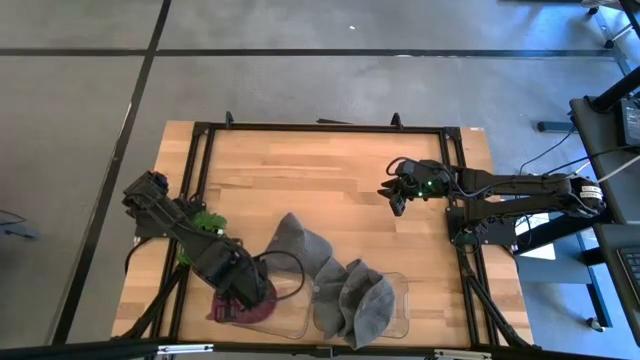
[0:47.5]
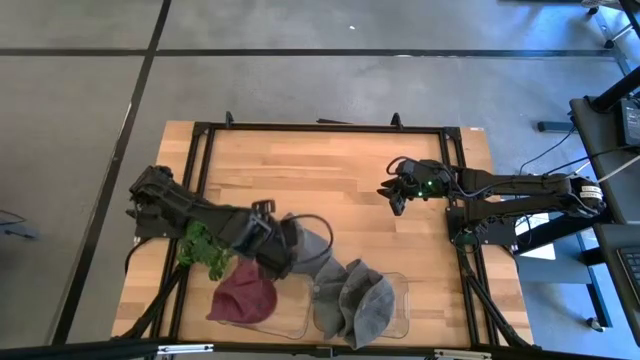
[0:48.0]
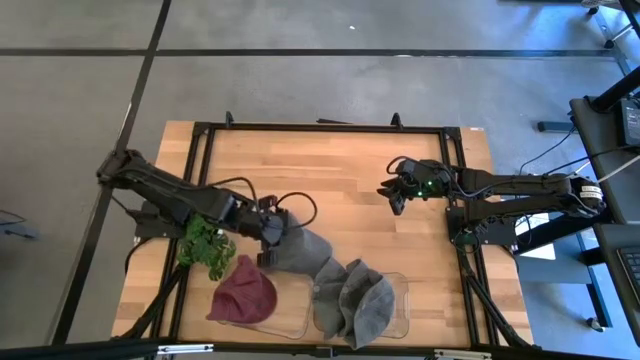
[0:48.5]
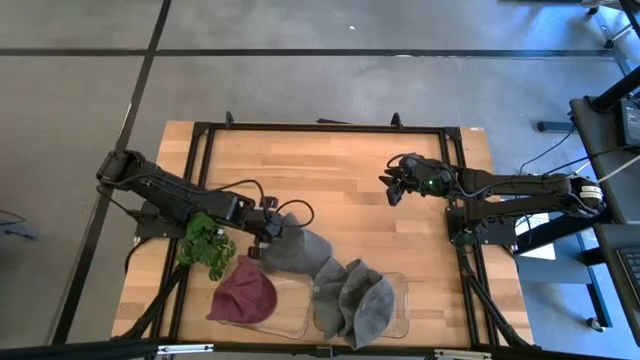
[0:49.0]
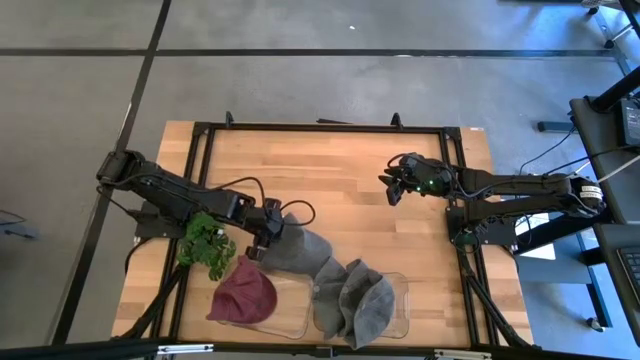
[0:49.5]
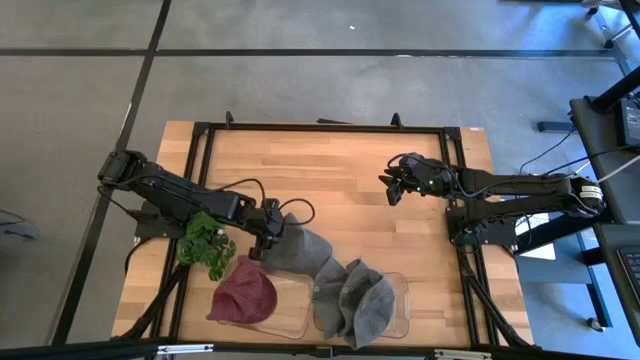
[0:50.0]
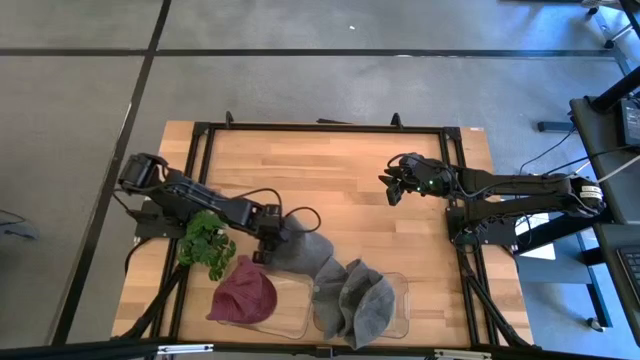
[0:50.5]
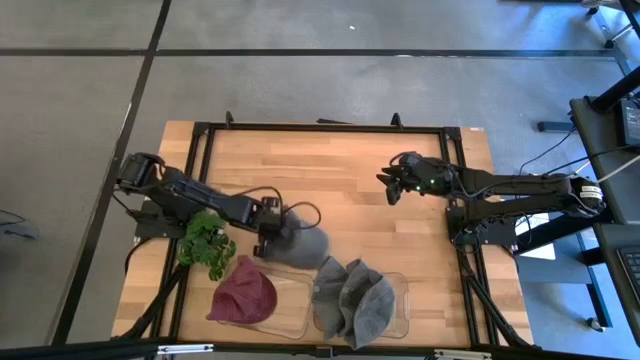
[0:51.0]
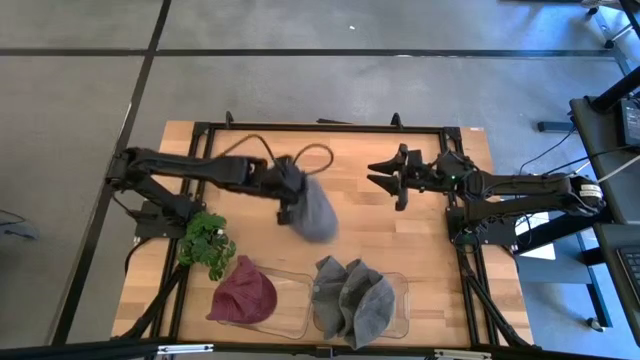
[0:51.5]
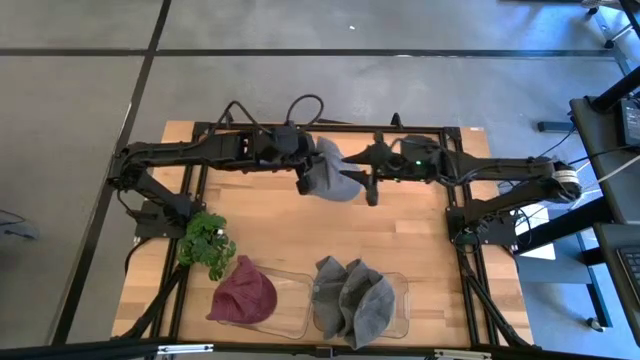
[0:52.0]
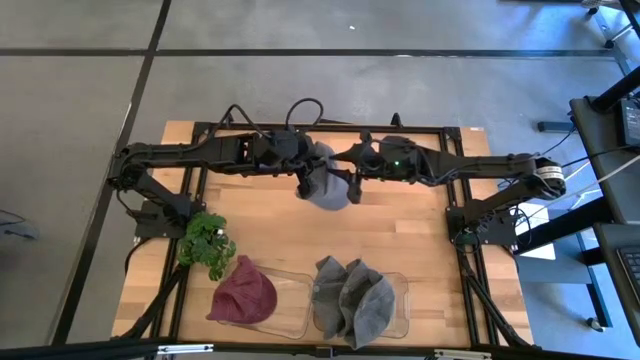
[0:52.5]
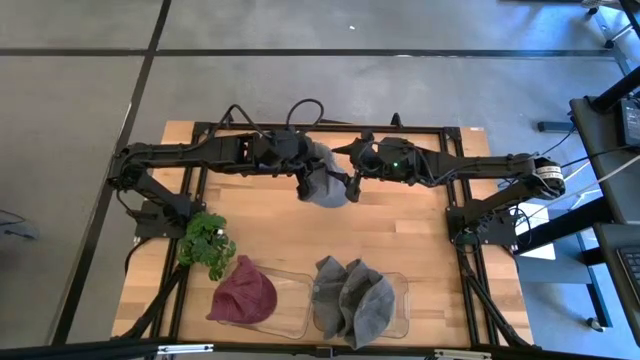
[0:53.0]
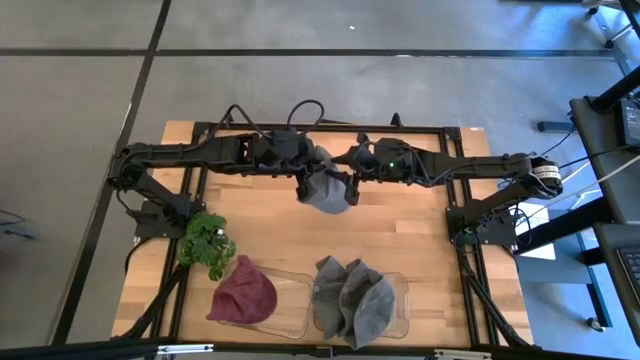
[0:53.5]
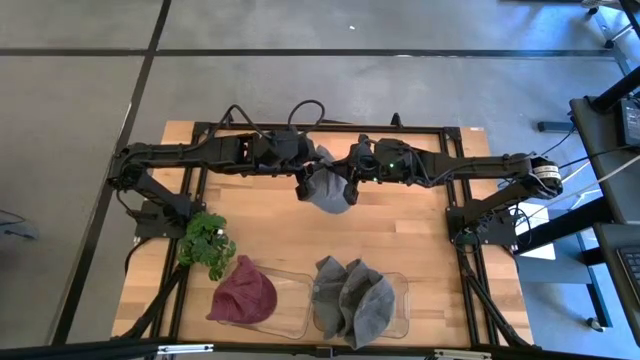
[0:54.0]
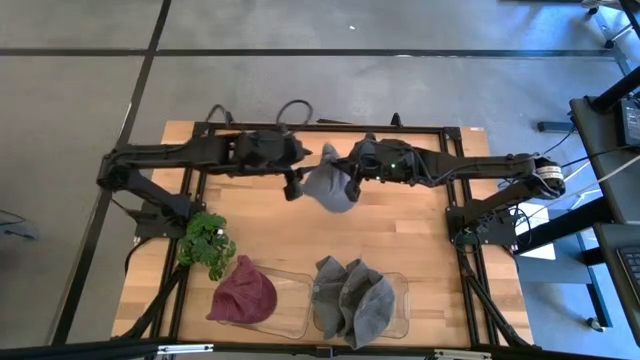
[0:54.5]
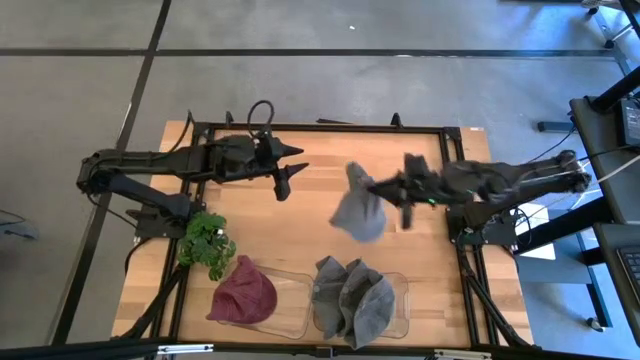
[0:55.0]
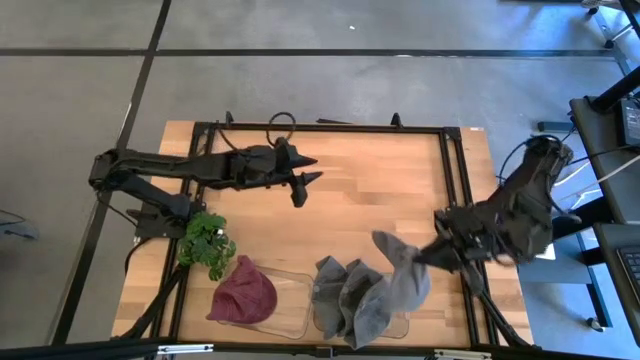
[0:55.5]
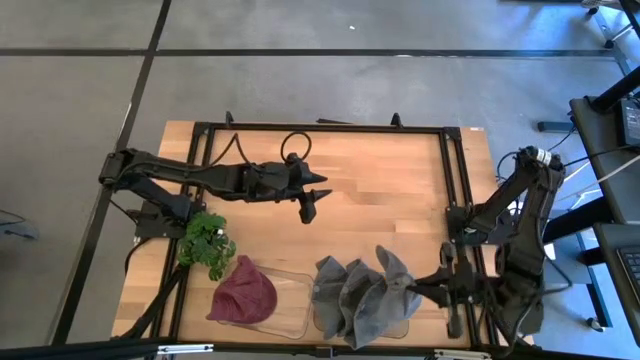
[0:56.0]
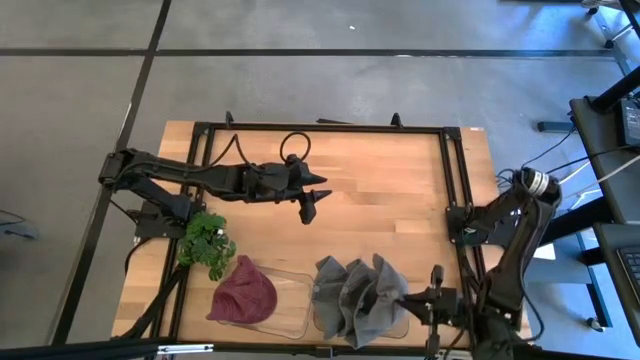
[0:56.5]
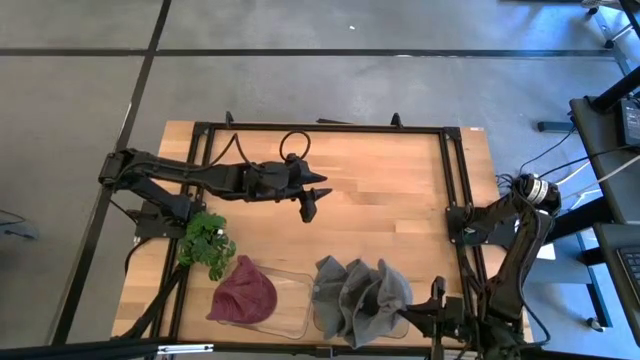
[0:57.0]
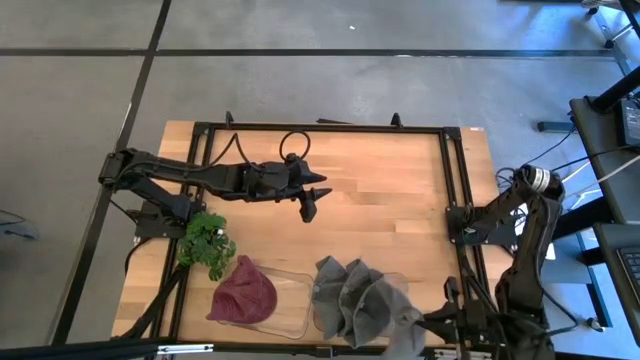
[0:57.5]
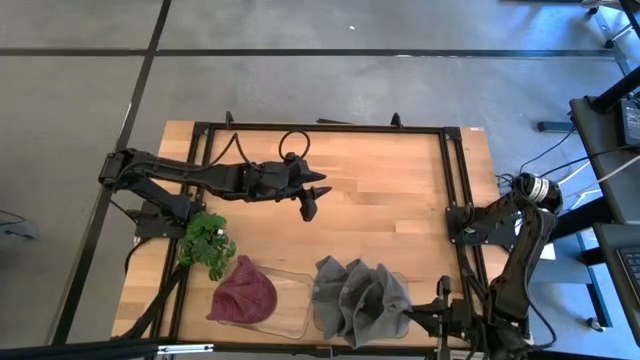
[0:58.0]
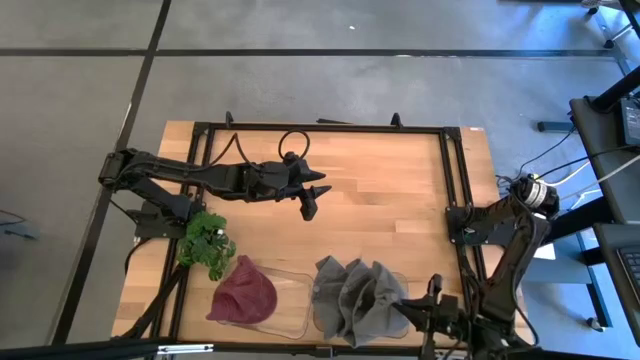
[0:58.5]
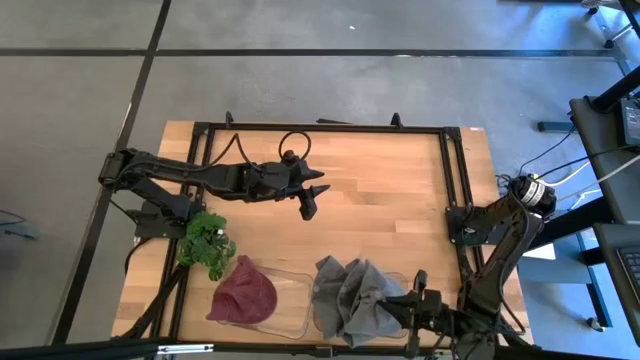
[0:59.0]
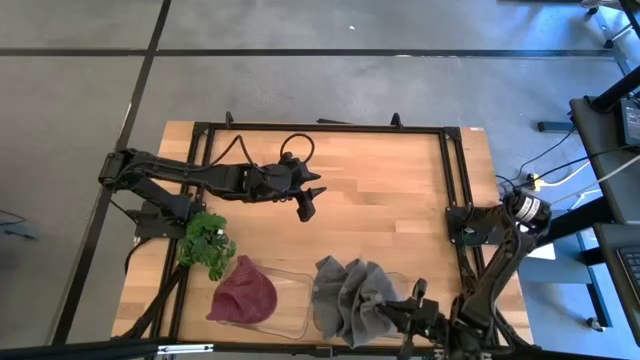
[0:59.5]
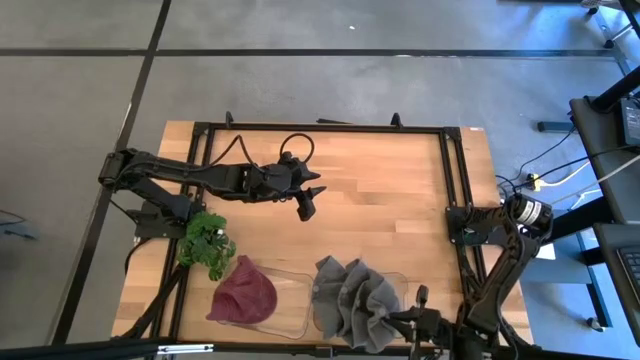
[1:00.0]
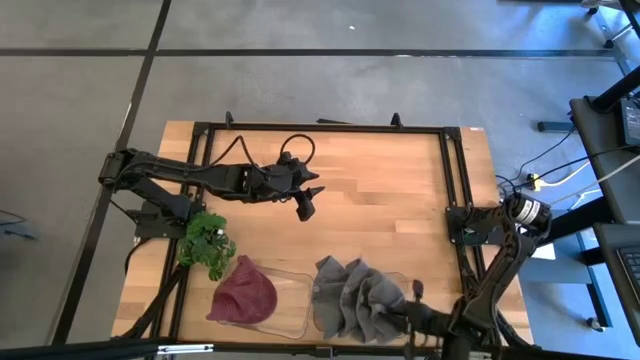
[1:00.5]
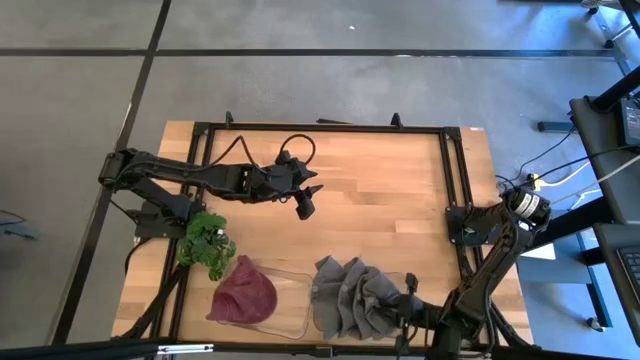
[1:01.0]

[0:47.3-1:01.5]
Task: Pick & Place hat
Put the gray cap into the right transparent bin

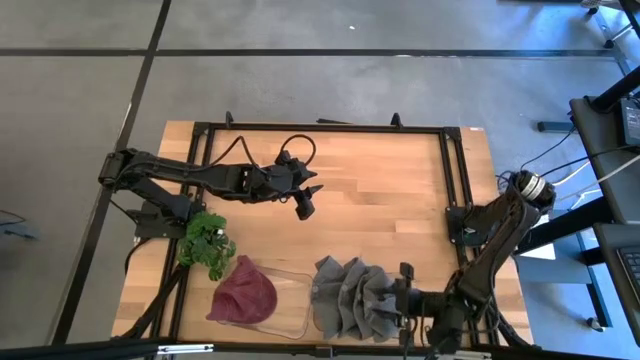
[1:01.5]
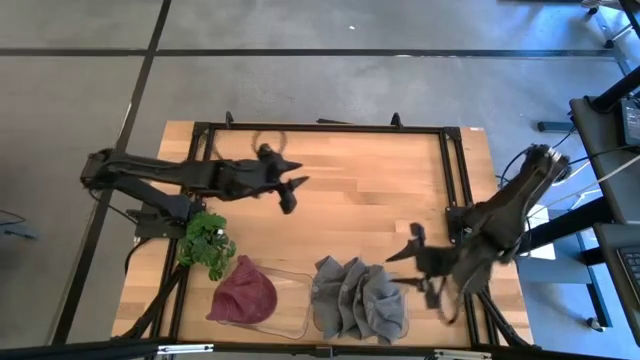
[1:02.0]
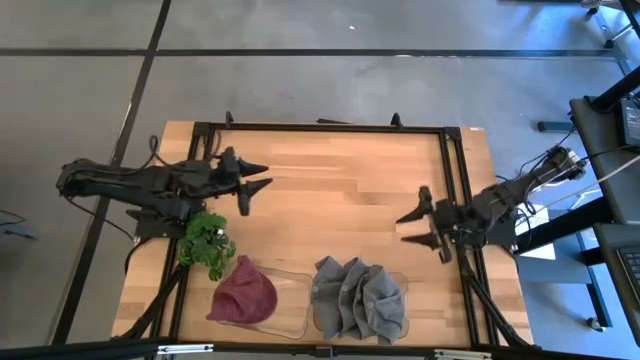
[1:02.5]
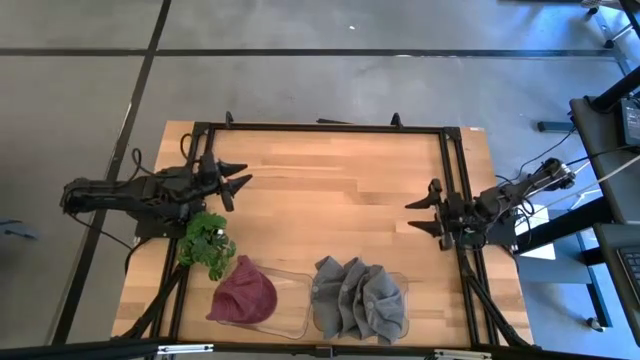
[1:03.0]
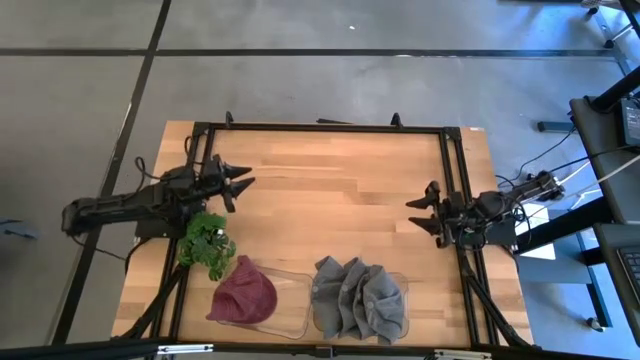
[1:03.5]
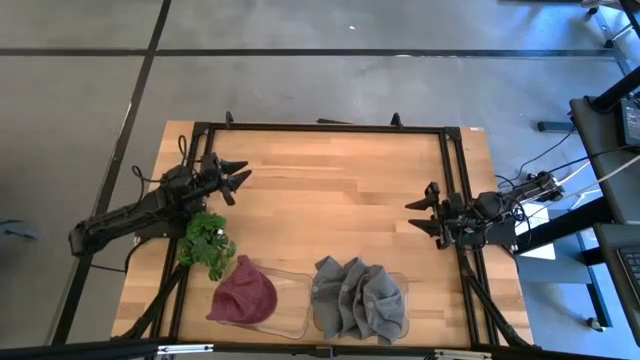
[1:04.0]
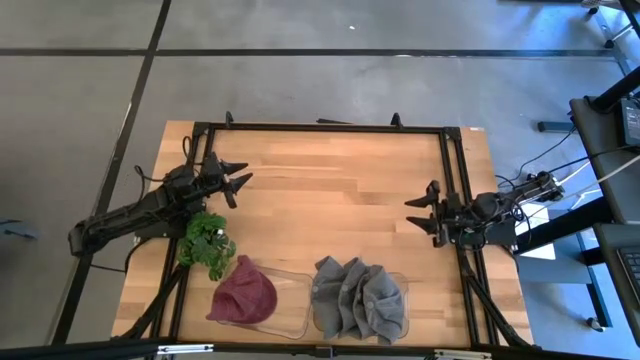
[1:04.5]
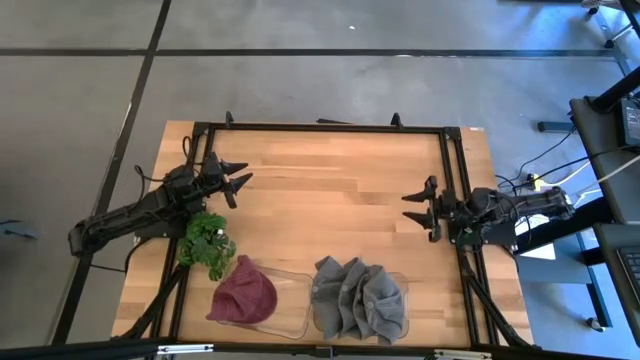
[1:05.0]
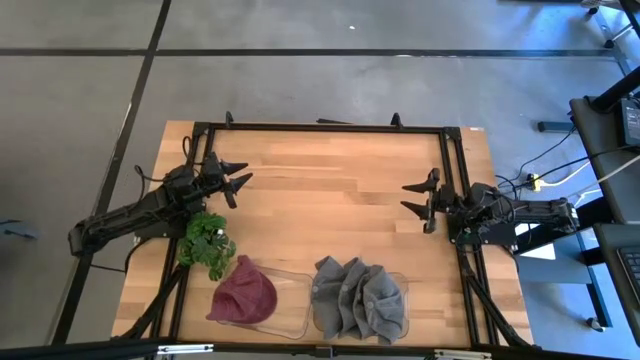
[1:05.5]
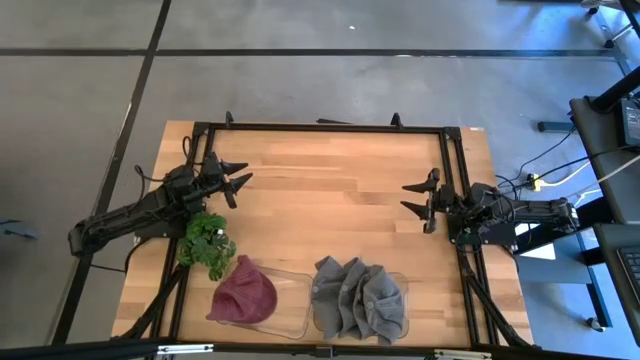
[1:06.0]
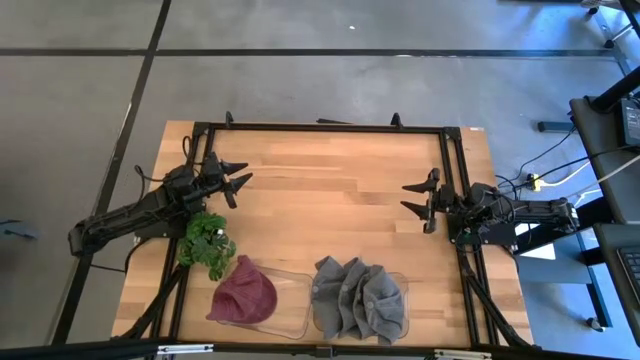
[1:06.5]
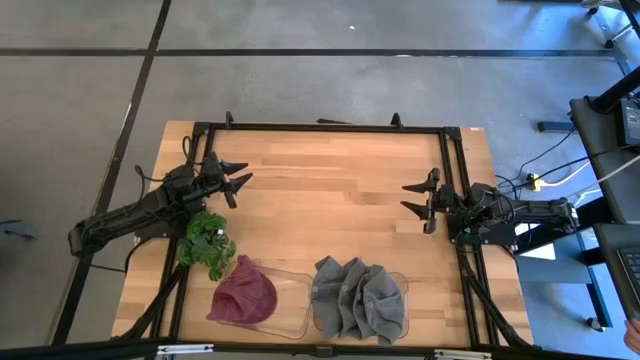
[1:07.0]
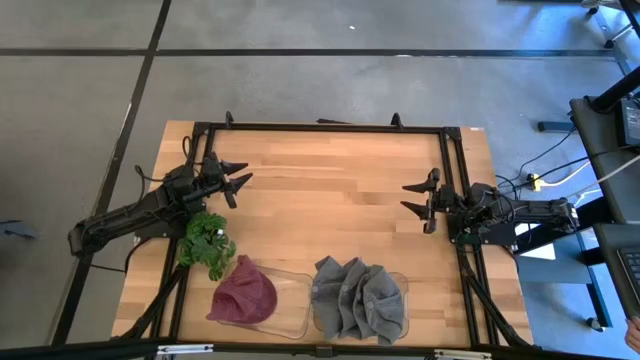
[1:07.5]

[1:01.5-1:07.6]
Return to Home Position

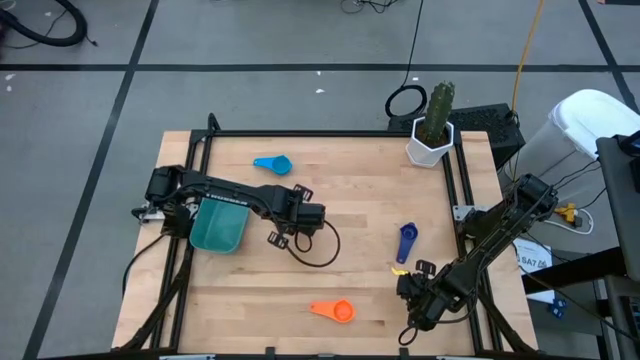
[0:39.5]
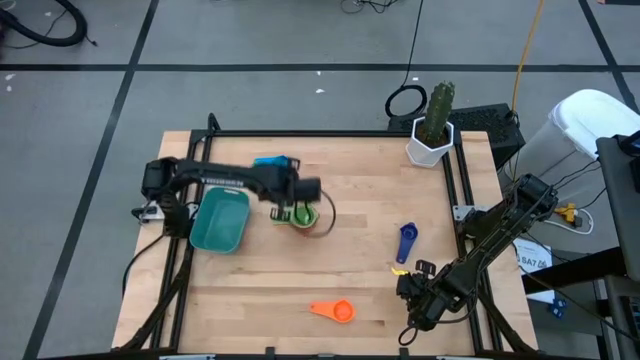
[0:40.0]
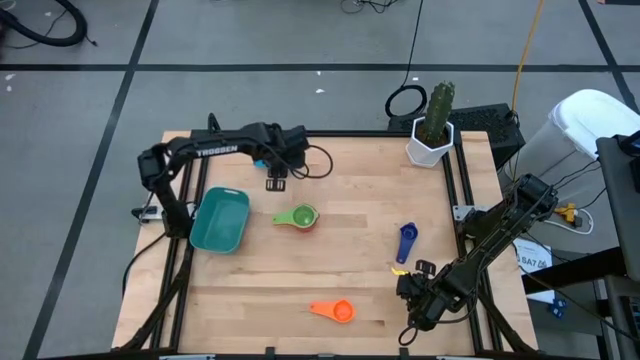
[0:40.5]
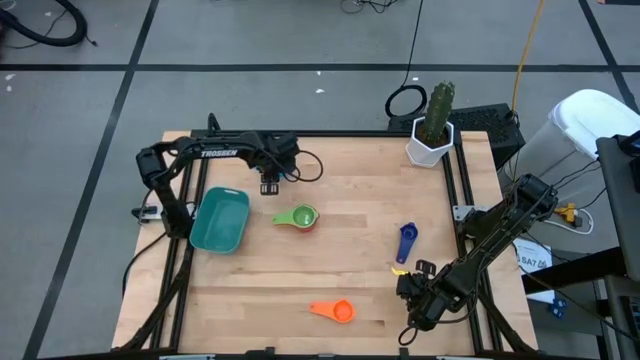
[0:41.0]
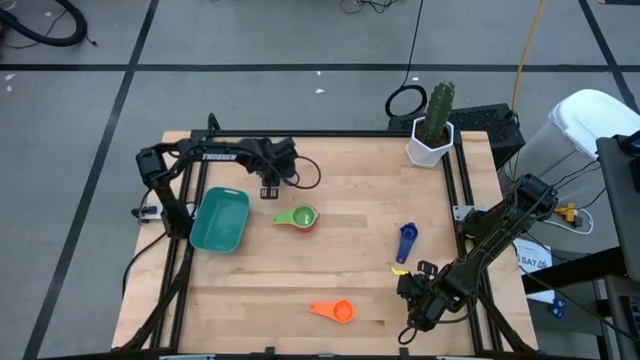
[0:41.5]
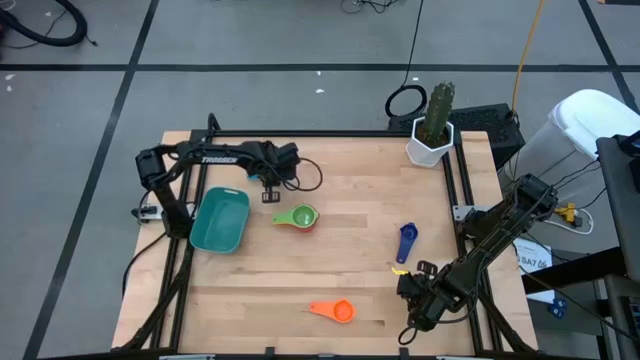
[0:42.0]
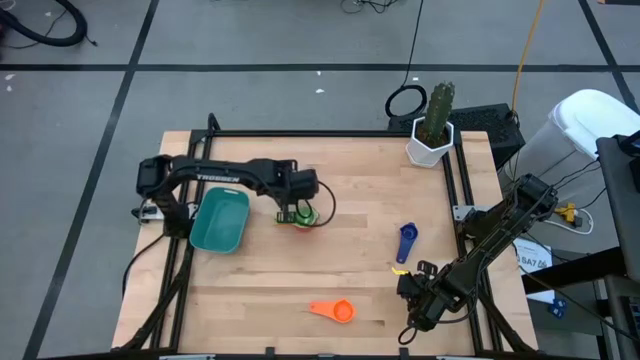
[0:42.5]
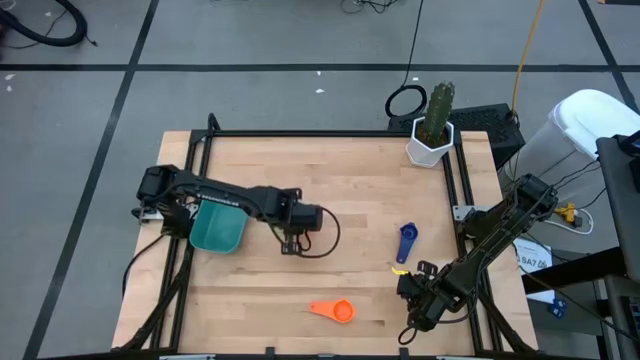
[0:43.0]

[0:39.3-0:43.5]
Task: Nest measuring cups in basket
Stack the light blue measuring cup into the green measuring cup
